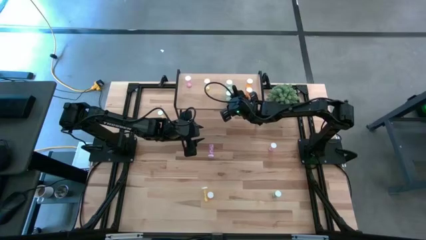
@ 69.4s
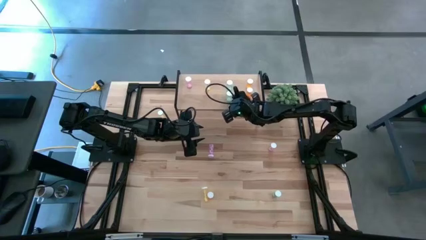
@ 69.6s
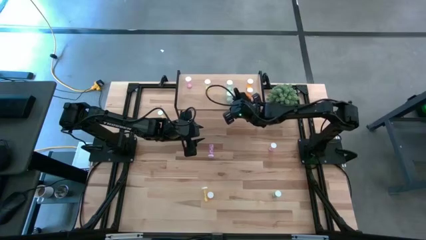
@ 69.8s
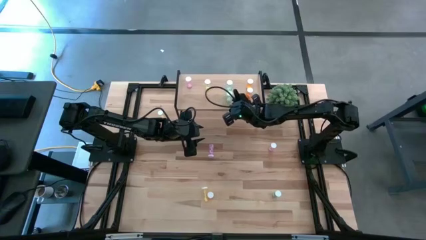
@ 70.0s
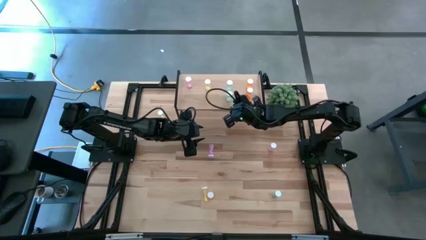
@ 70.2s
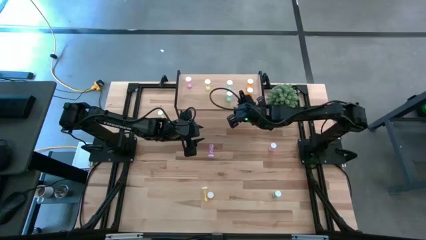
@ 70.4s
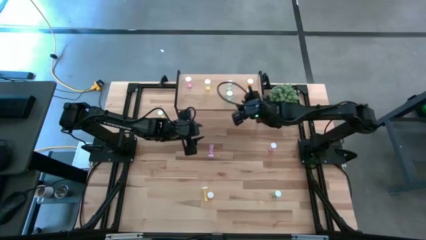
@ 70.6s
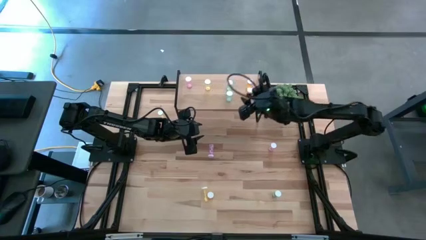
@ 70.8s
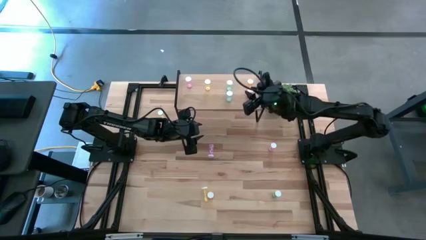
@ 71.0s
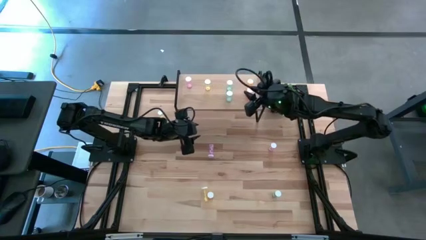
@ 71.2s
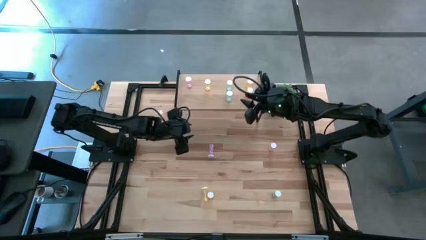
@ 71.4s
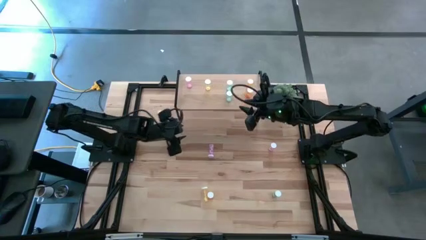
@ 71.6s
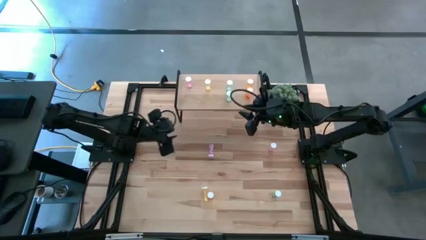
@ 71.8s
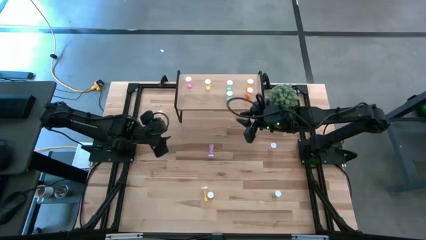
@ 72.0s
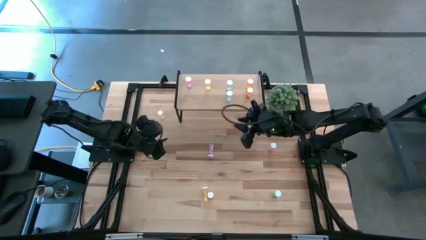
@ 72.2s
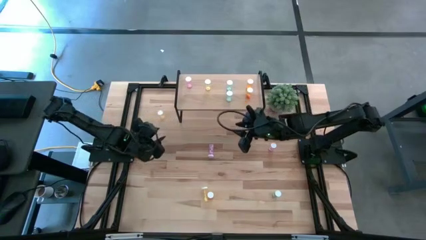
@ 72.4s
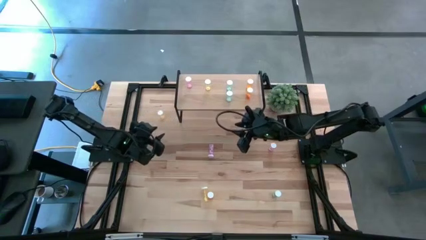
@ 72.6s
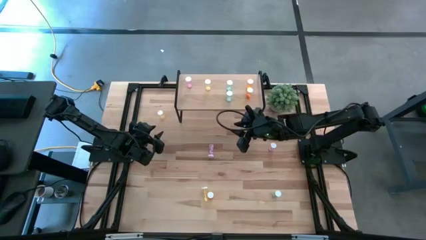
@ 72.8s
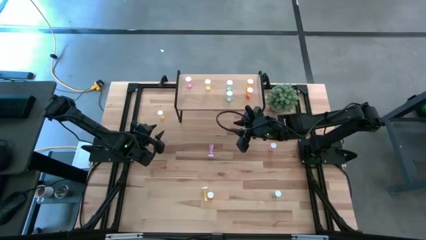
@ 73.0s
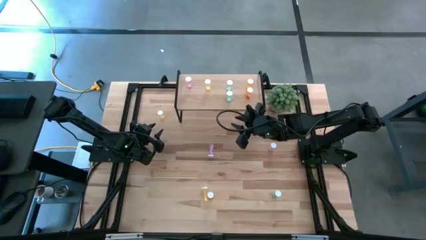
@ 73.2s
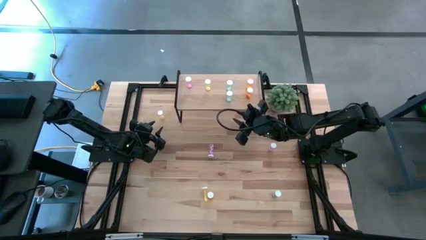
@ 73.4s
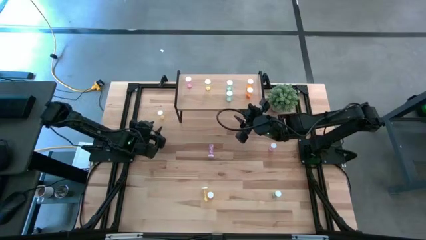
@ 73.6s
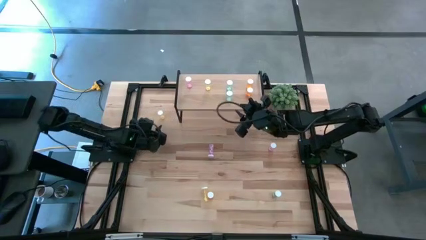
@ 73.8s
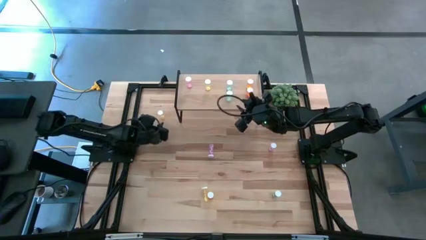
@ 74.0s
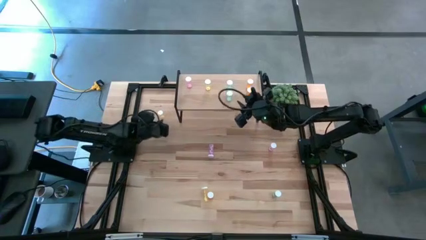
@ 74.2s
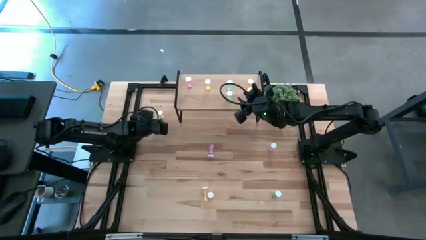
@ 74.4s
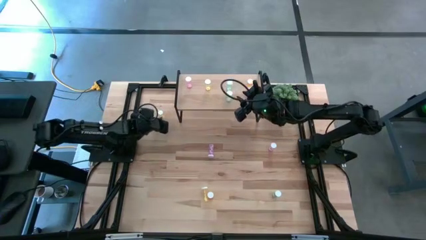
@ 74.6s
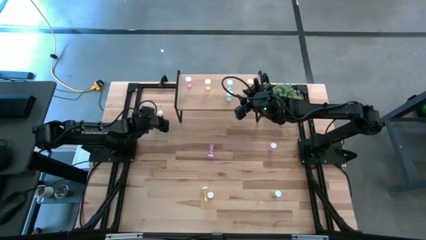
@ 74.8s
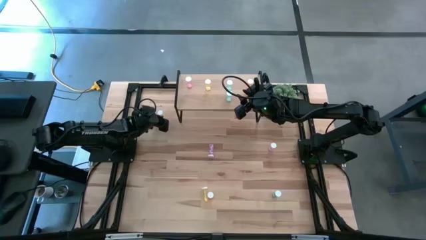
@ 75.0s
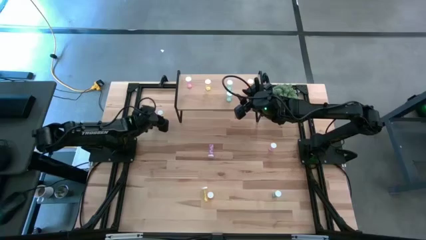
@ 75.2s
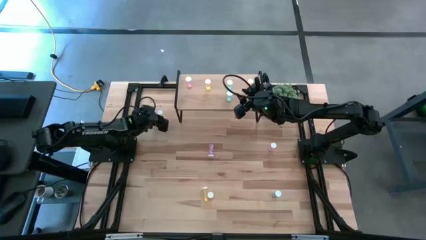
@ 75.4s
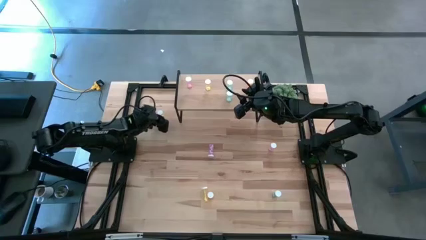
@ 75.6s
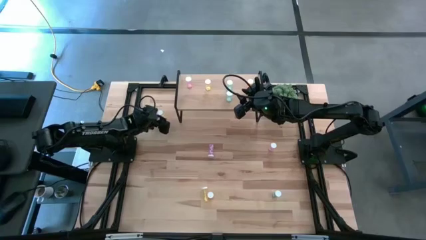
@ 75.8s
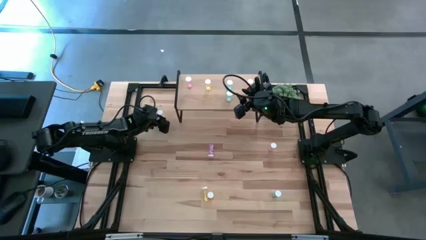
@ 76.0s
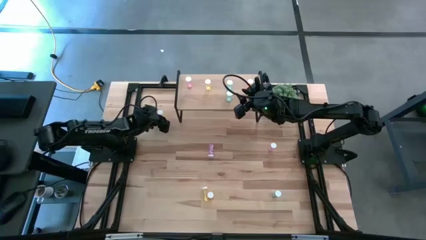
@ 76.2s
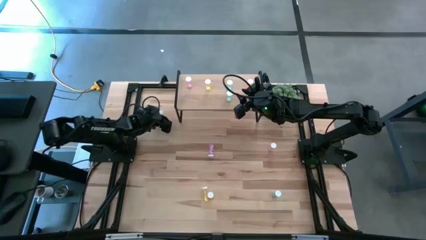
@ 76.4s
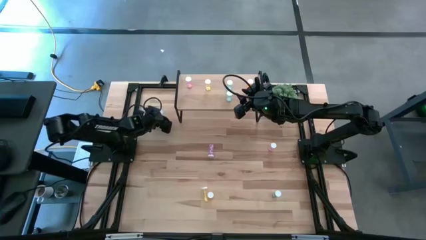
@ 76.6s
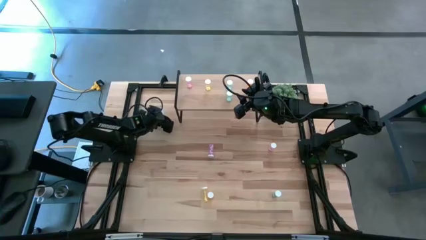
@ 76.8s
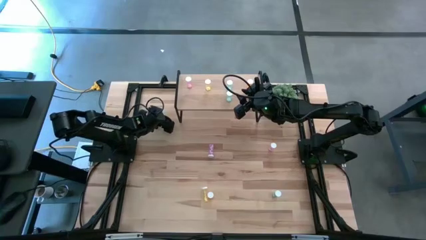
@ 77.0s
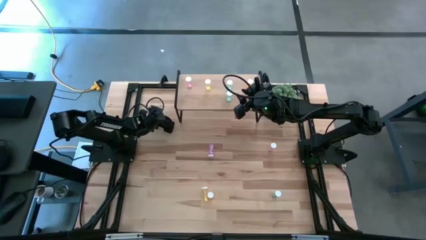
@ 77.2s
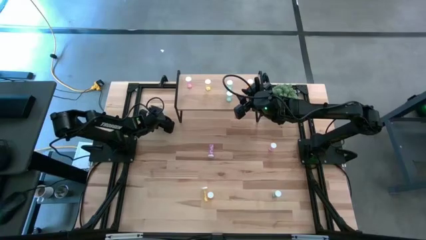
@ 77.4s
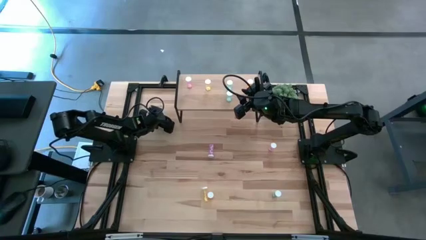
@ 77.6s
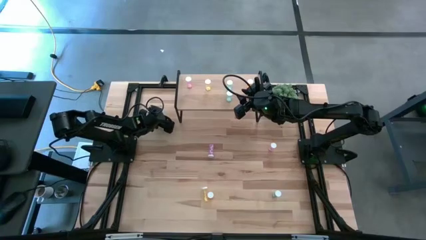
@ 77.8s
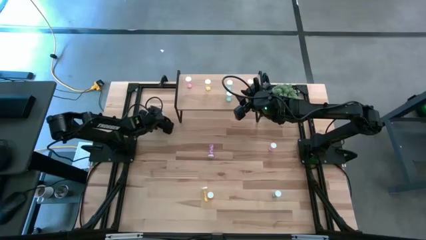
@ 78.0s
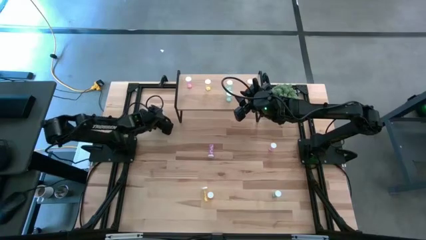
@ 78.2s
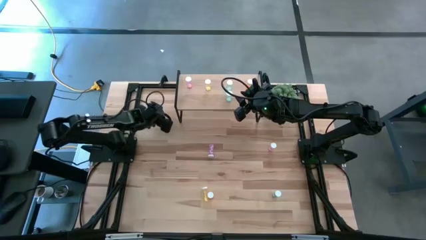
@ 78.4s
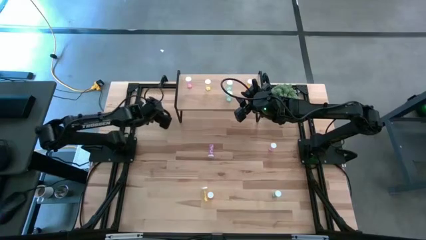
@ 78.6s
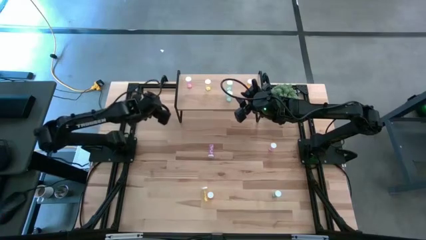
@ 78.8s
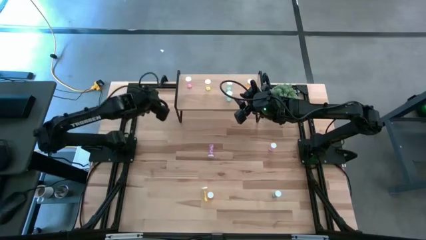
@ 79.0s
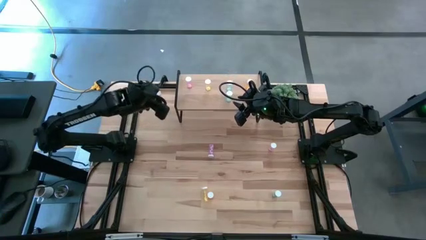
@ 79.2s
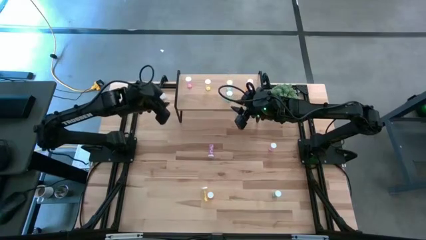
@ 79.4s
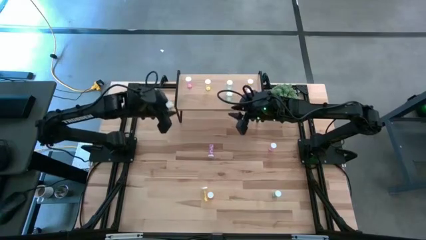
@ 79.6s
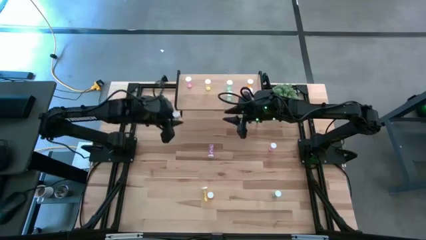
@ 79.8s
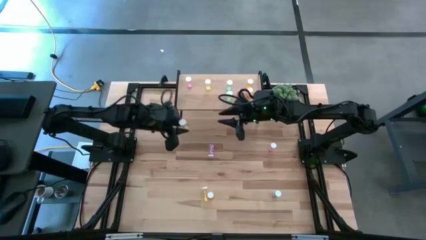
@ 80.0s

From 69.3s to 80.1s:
Task: Pick and place medicine bottles onto shelf by color
Put the top yellow pill bottle aligned with the other yellow pill bottle on the shelf

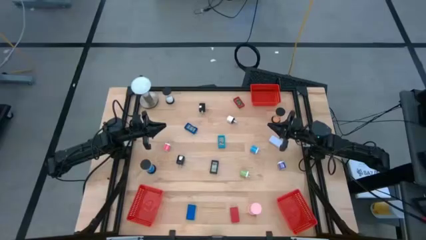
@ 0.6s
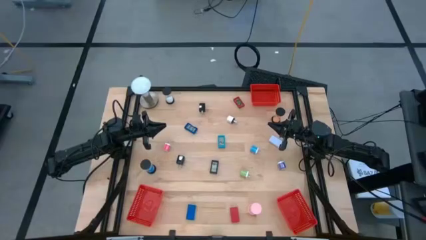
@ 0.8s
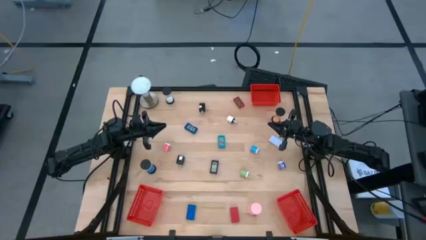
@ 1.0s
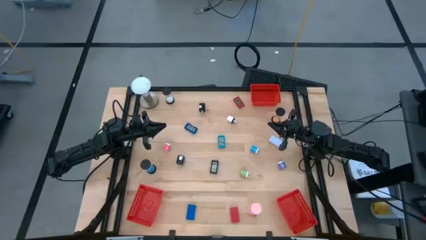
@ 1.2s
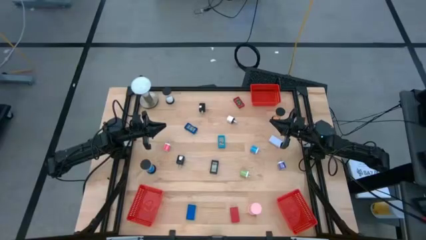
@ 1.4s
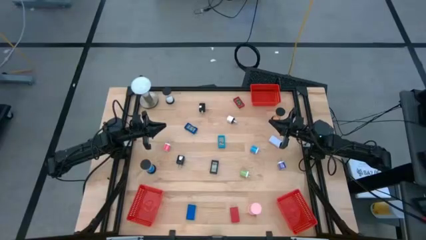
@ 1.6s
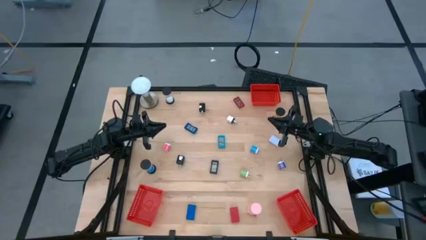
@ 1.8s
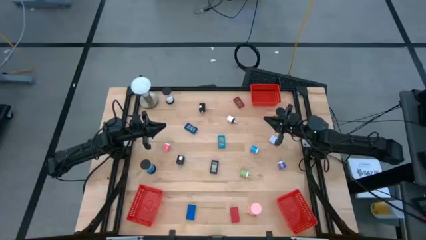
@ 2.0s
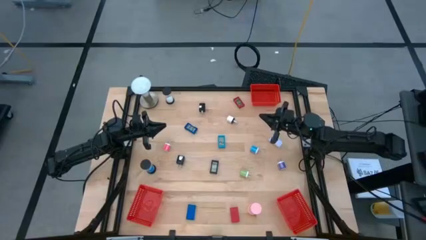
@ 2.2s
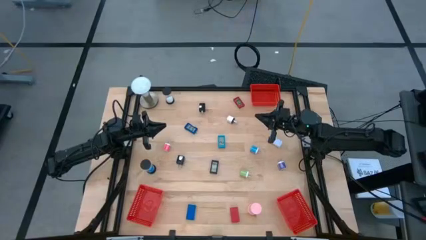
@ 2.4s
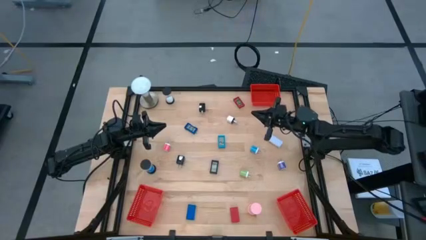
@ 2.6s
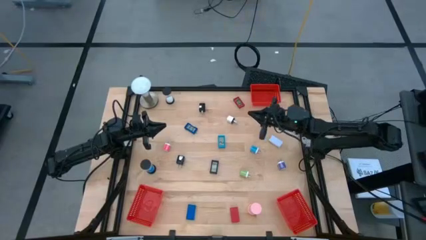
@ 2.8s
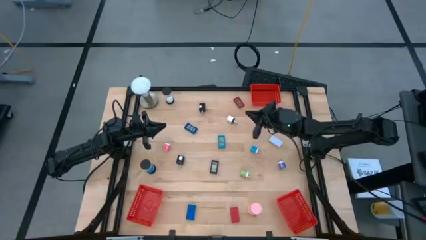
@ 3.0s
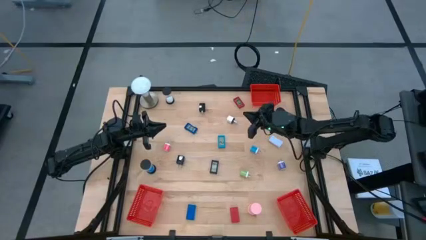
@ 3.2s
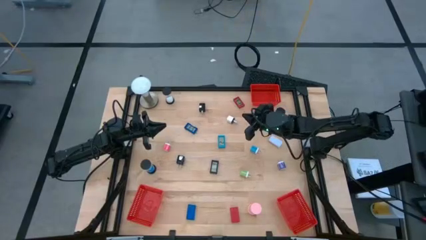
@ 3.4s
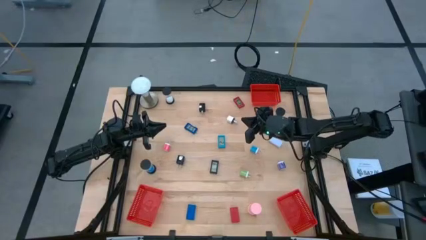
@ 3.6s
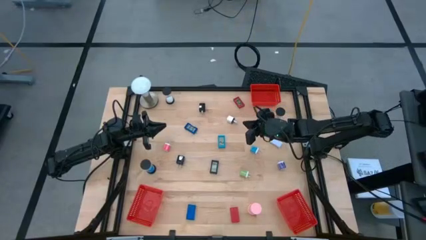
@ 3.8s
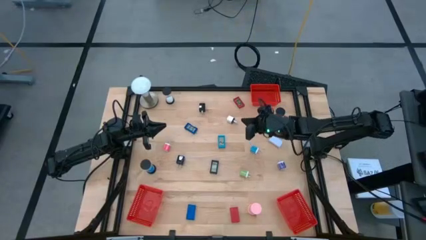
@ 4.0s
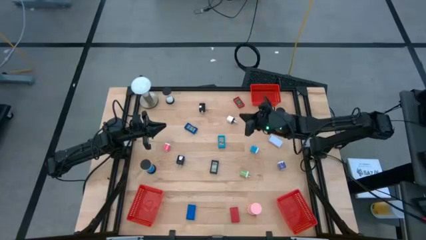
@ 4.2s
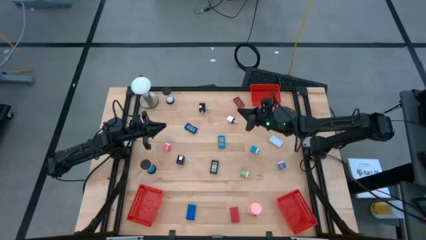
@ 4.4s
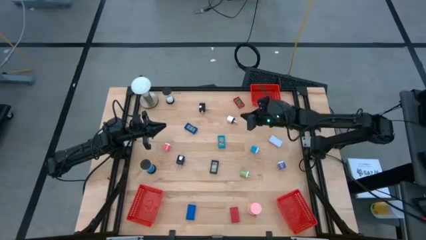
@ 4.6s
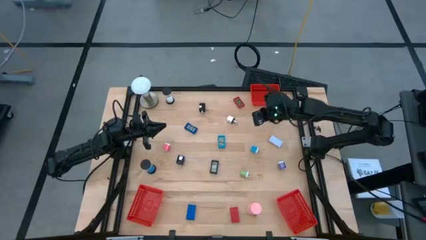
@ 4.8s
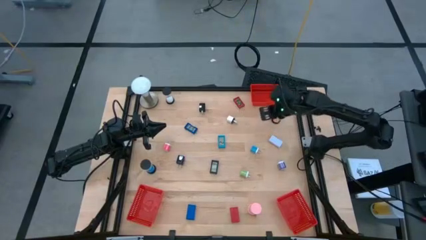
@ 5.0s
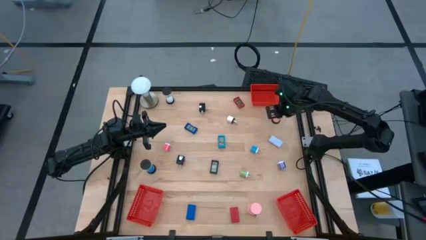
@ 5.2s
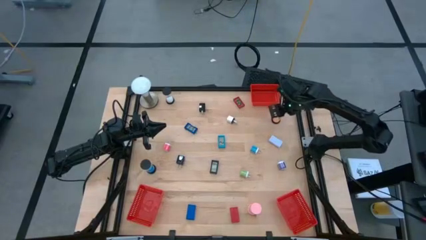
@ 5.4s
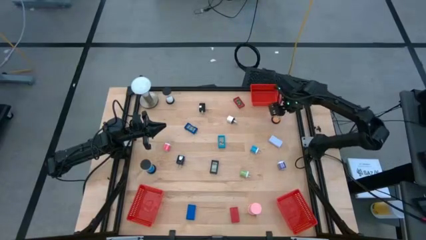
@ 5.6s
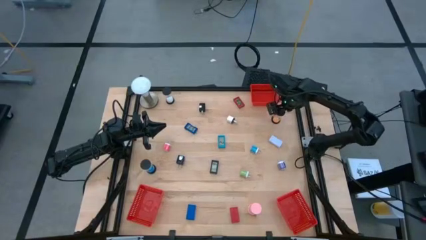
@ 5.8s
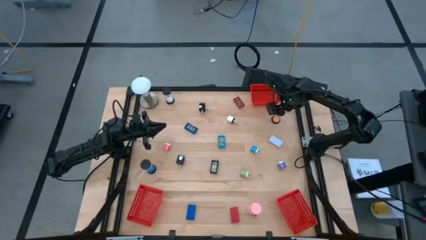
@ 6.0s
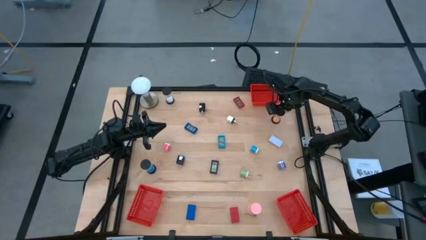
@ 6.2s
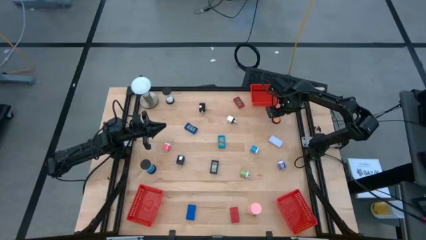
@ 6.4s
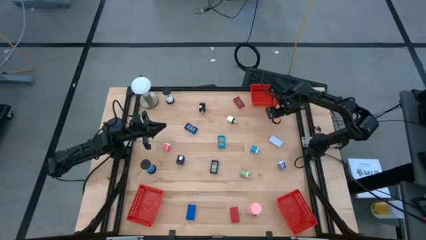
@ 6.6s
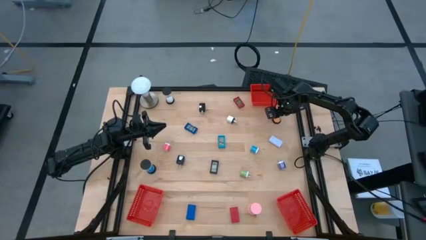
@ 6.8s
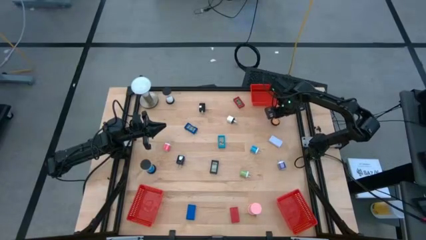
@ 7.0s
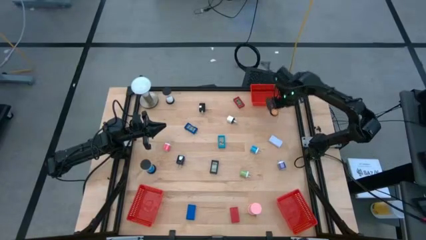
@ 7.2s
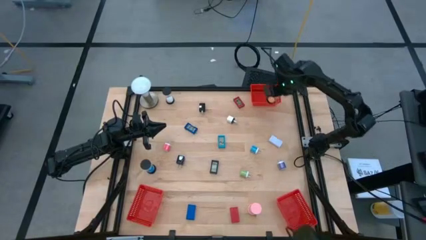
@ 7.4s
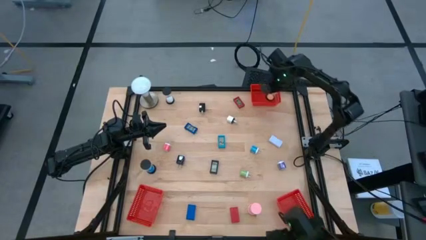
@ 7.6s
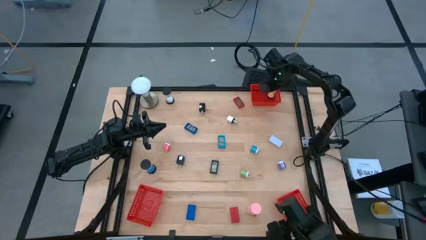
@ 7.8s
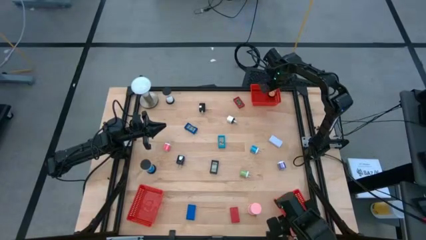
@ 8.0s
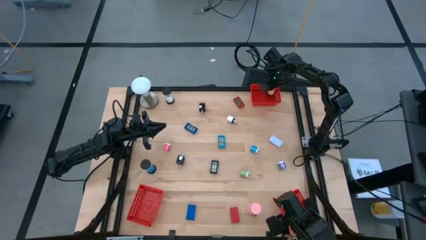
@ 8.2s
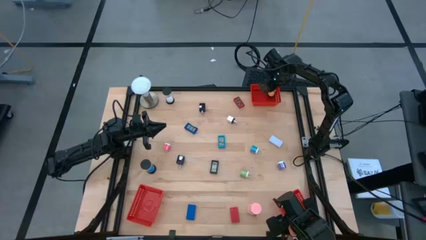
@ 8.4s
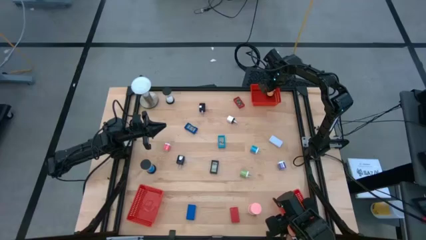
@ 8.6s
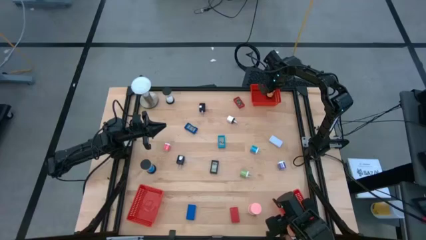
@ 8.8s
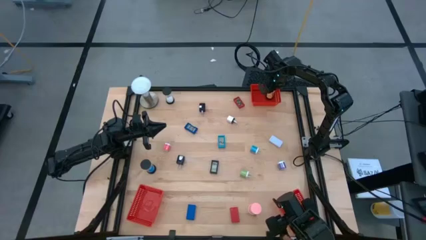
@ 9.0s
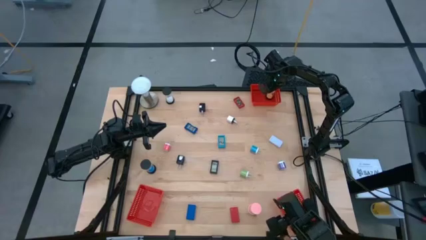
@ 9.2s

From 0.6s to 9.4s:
Task: Pick & Place Office items
Put the orange hourglass into the top red basket
